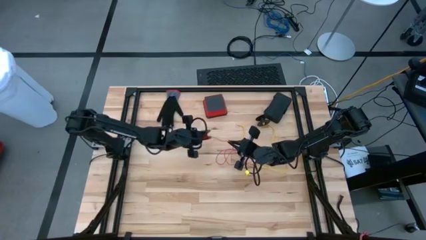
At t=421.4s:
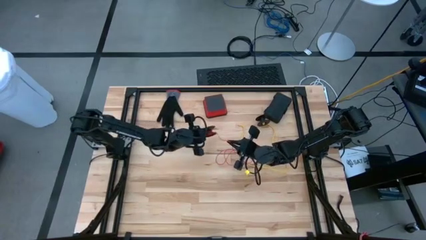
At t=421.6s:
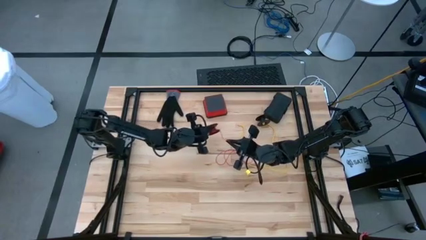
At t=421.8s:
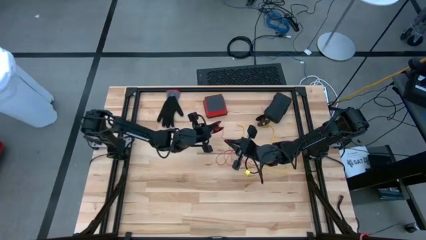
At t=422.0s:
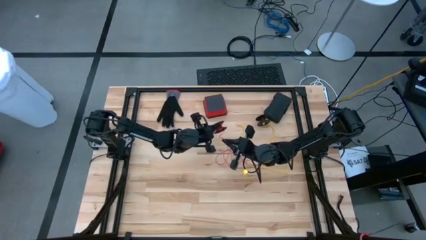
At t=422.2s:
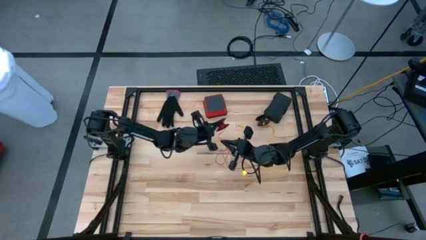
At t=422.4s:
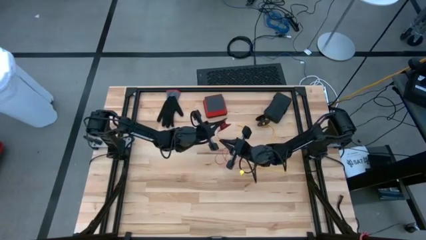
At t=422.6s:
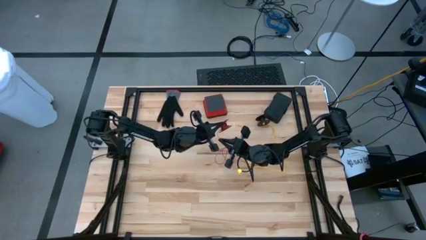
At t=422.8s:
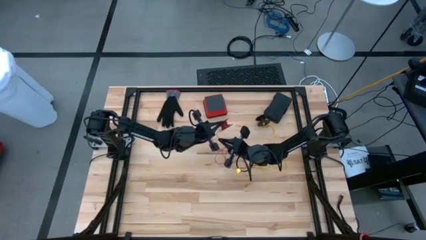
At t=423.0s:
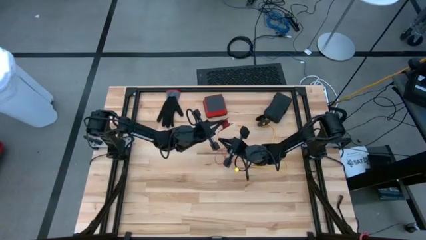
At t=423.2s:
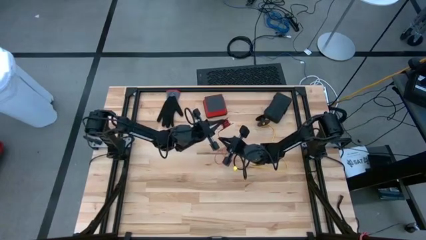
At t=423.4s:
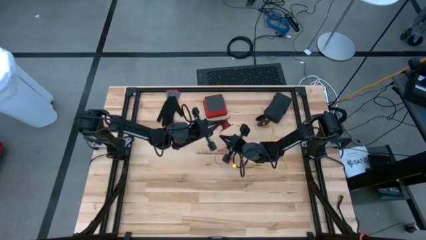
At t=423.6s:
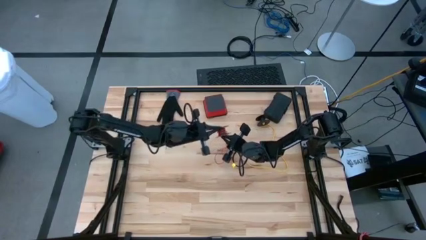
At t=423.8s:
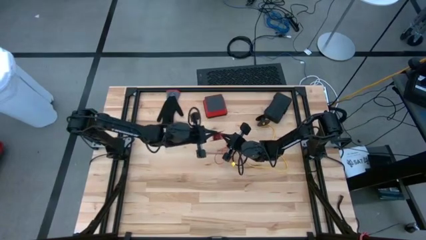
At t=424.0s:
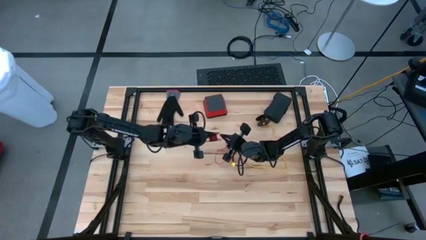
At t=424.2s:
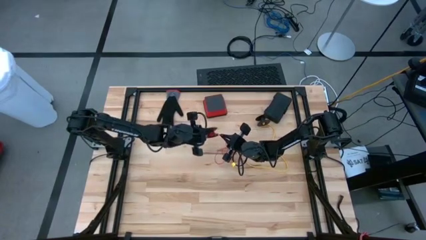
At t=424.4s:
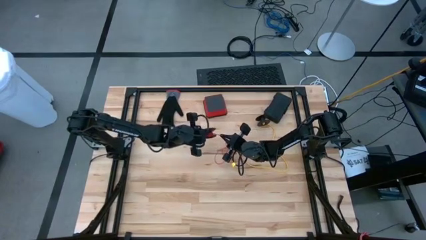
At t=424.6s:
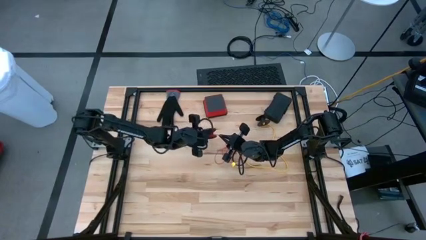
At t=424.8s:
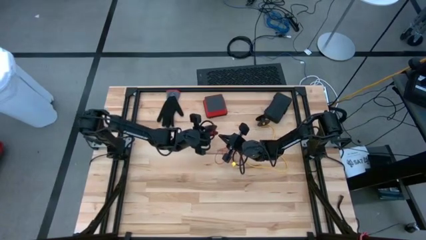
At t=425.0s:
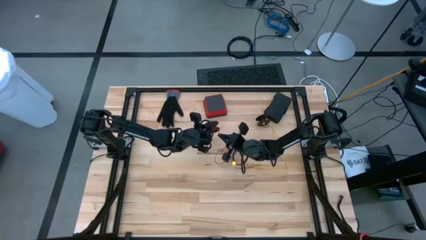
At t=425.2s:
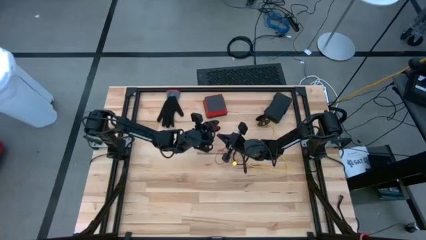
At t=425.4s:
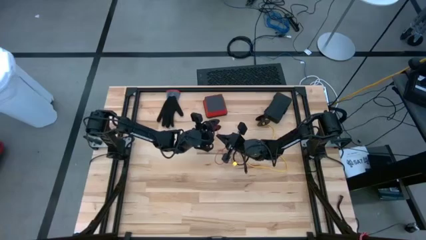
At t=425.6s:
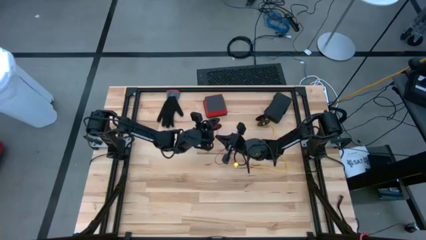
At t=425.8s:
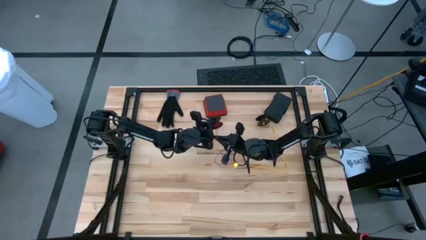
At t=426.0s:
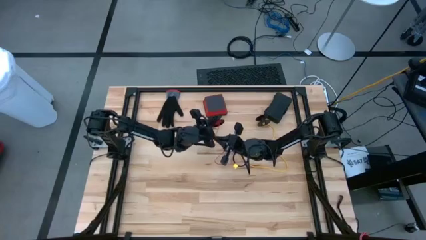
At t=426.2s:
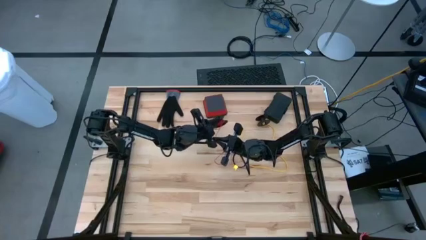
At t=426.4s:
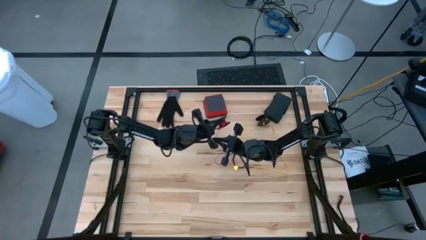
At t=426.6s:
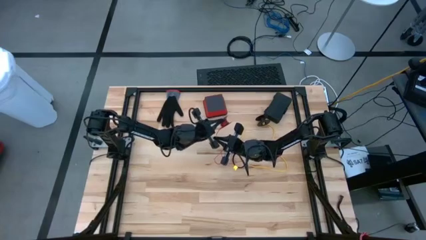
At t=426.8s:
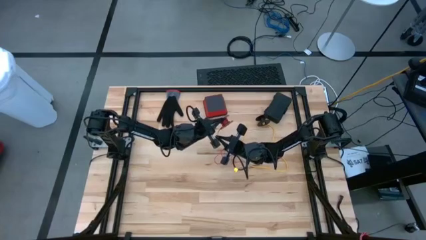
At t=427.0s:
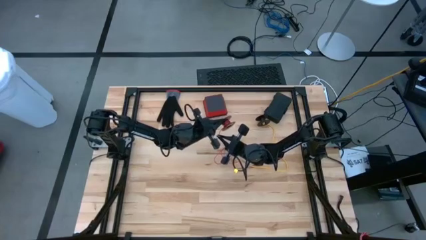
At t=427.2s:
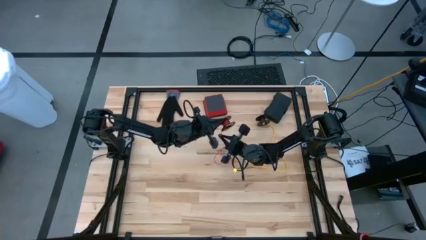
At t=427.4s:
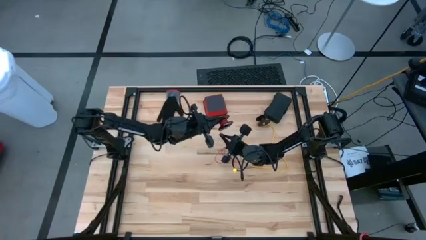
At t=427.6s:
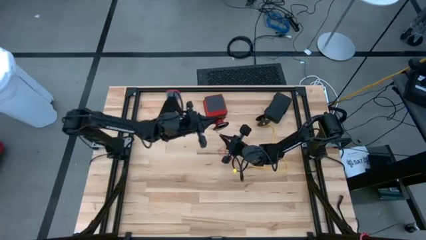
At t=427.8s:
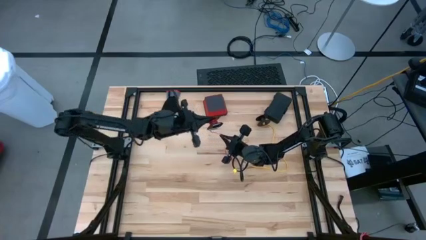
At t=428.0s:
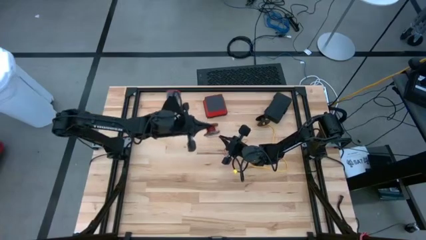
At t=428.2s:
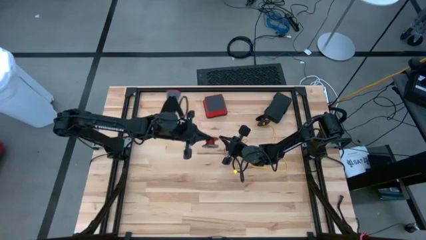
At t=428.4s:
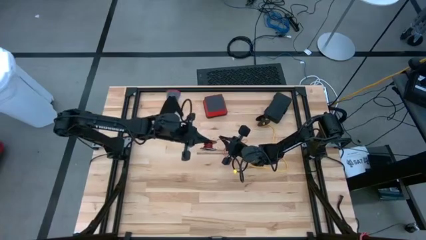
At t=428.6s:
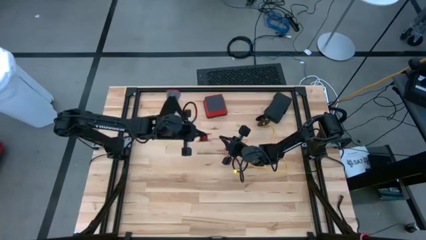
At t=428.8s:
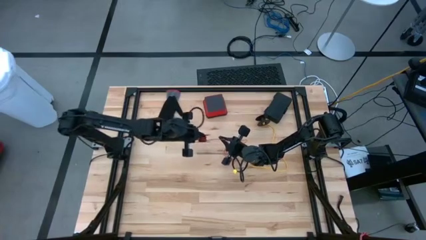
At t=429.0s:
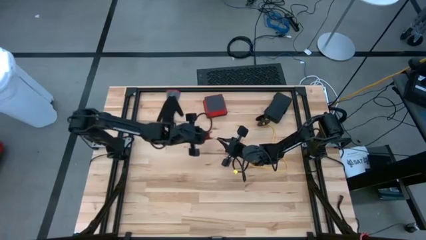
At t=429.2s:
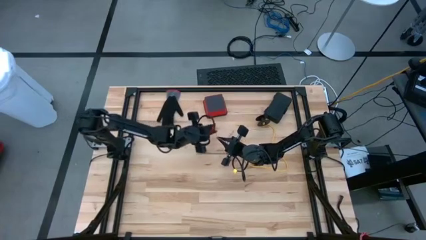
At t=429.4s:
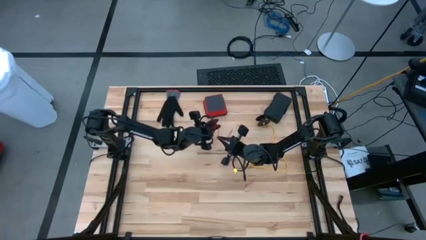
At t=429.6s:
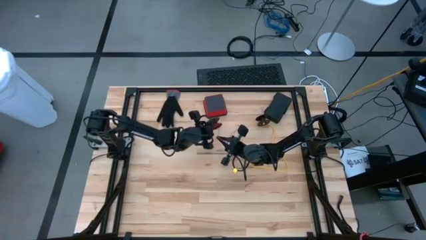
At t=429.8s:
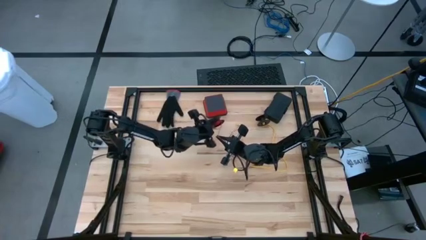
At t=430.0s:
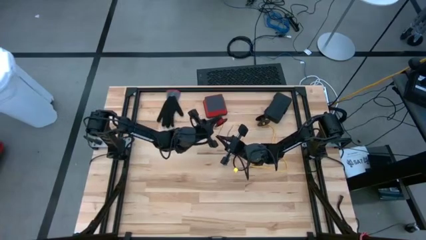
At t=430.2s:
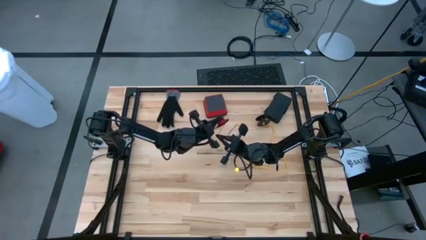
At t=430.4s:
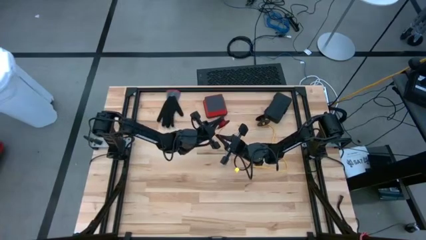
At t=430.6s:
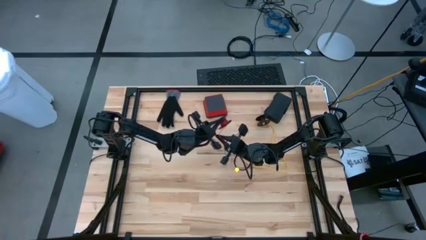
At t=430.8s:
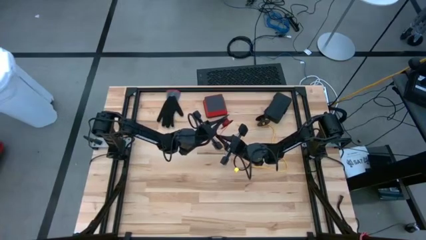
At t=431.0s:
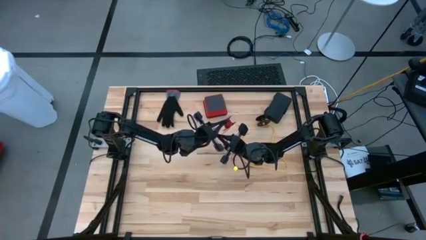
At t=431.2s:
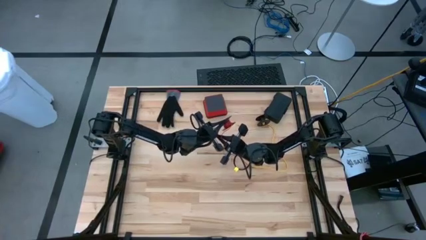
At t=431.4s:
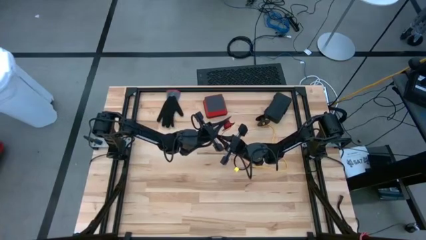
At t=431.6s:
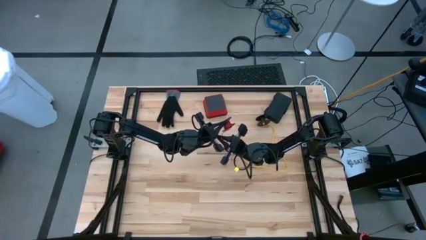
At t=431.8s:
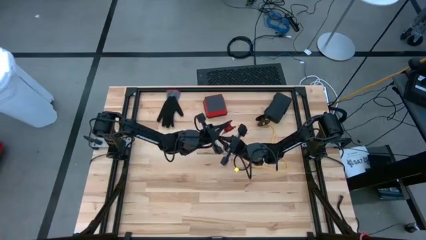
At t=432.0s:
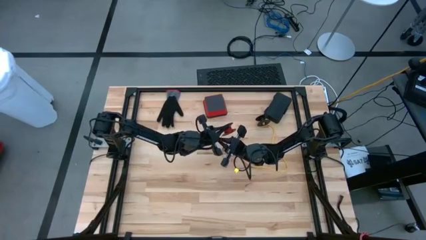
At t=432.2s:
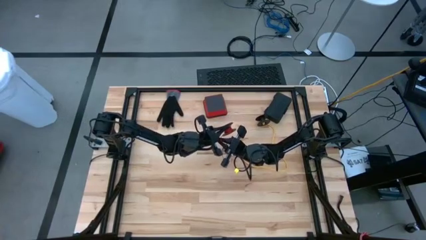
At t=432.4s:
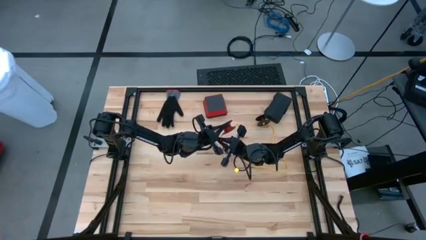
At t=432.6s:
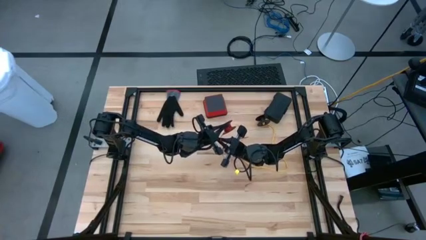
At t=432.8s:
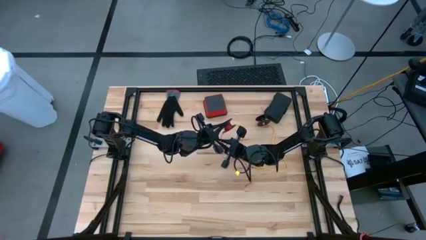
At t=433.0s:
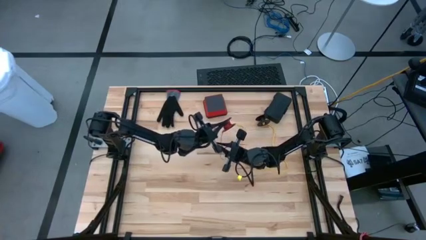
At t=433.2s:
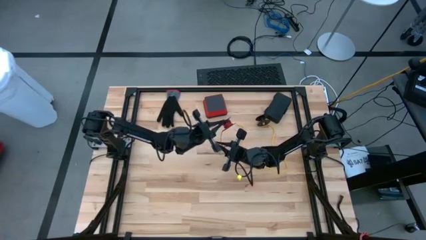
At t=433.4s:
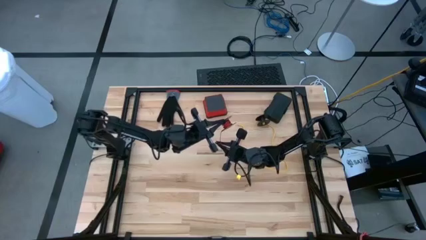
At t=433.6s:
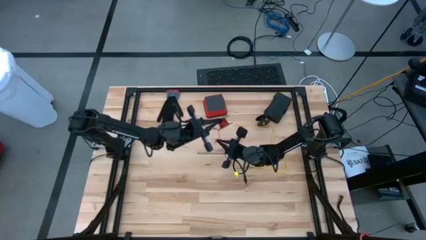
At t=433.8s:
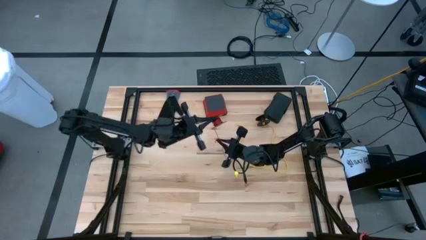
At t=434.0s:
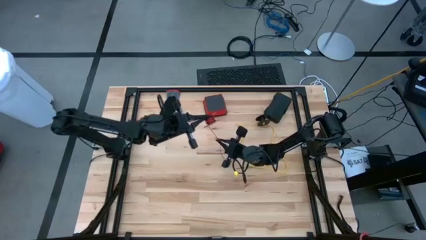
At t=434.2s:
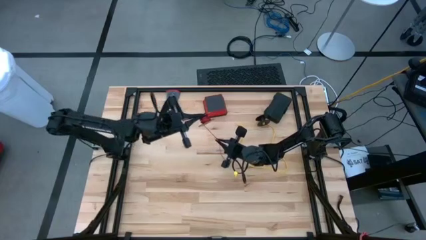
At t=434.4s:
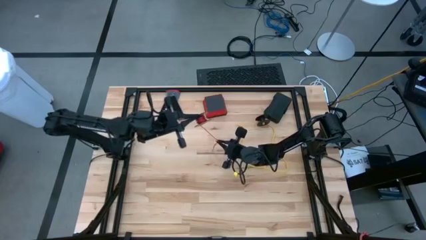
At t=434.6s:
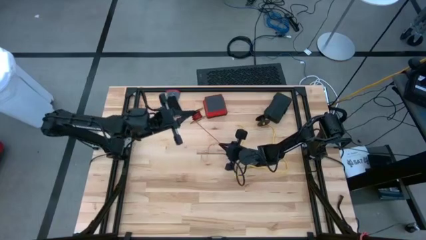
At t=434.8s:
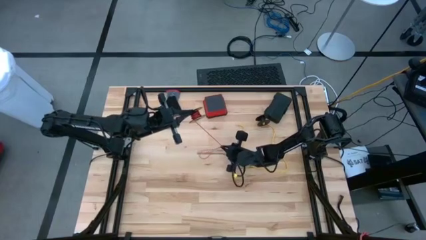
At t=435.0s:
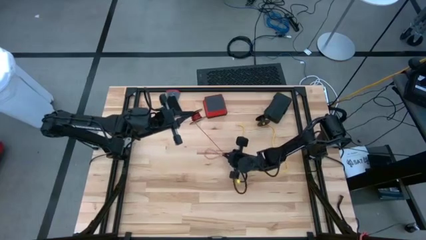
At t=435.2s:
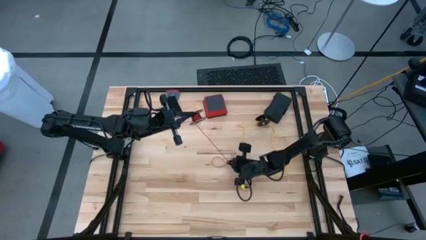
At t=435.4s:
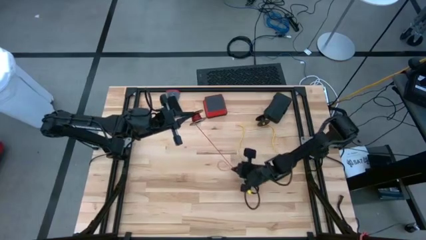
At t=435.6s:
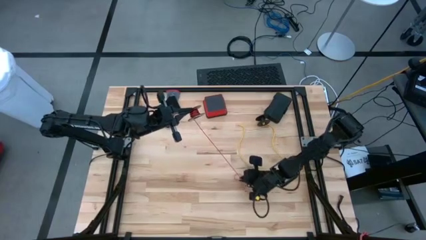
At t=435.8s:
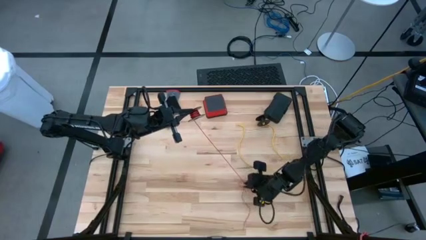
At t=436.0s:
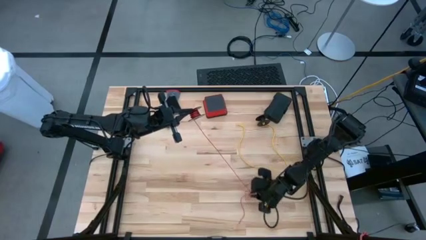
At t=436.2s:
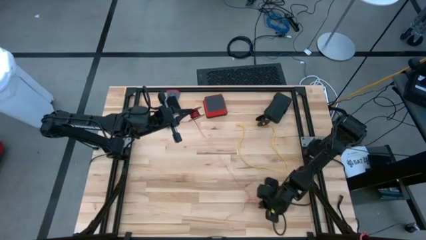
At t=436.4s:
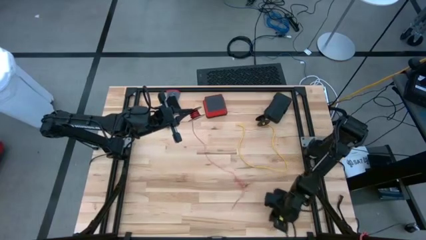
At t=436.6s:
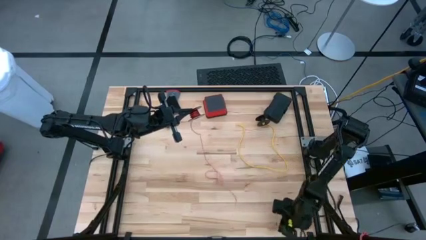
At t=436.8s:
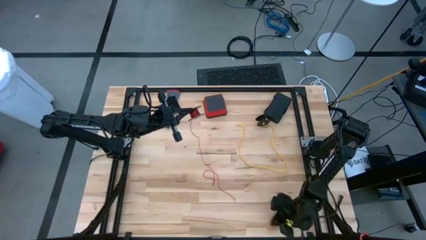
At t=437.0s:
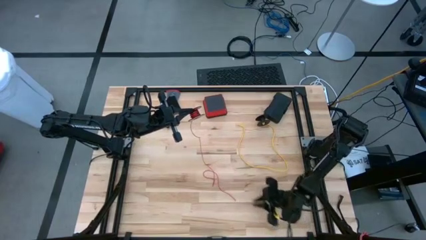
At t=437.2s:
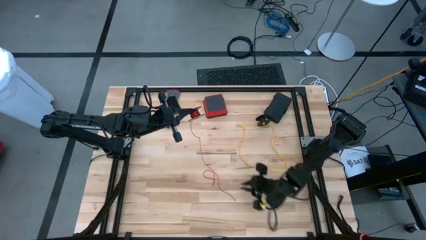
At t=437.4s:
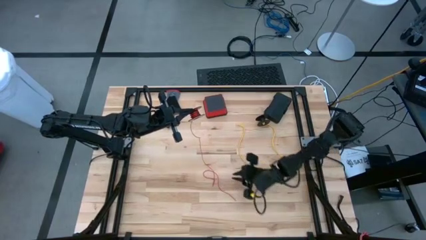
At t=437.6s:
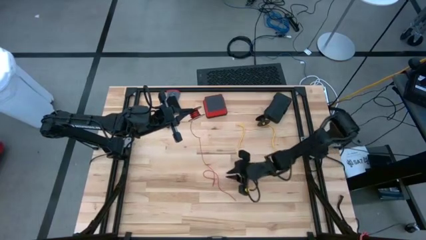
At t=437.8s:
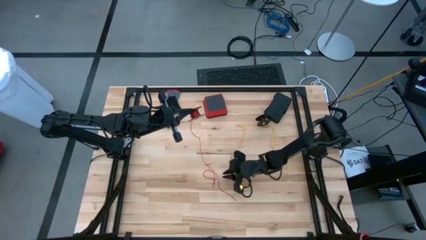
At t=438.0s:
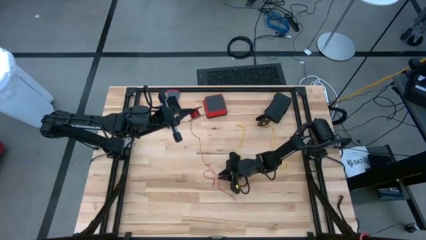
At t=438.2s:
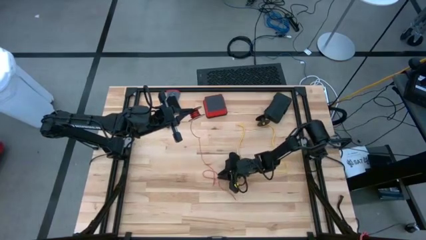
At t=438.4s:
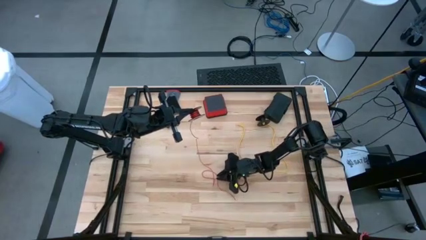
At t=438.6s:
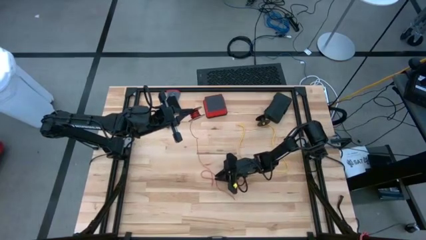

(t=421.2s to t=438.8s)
Task: Coil cords
Coil the red wire onto the spool
